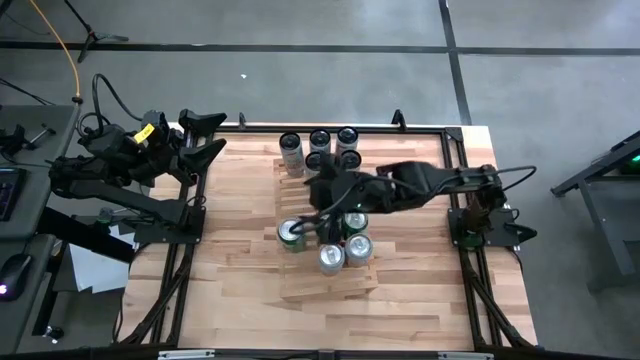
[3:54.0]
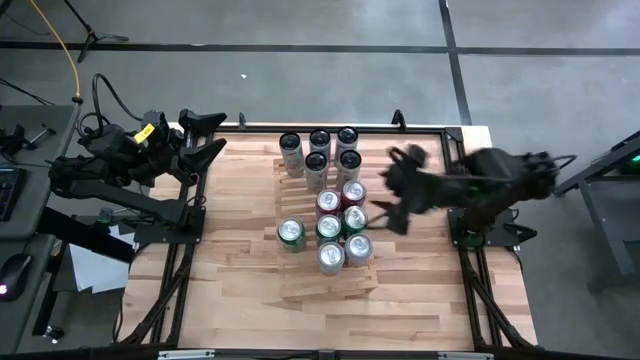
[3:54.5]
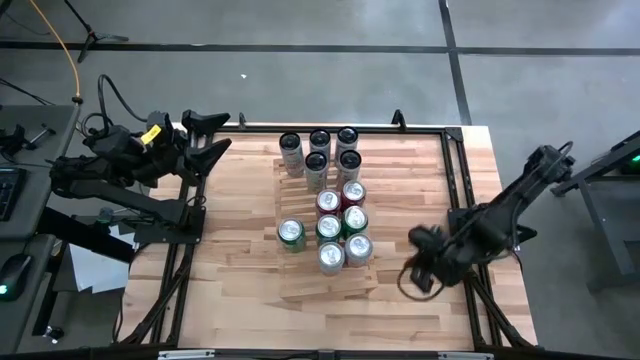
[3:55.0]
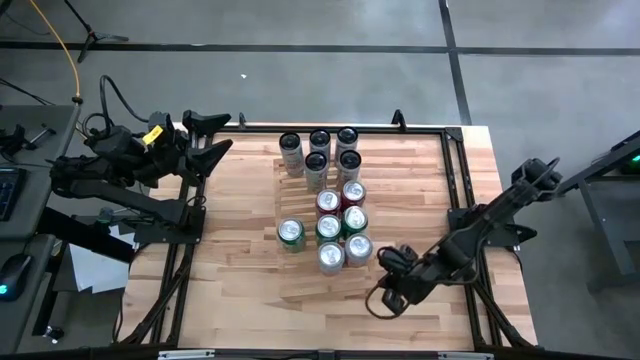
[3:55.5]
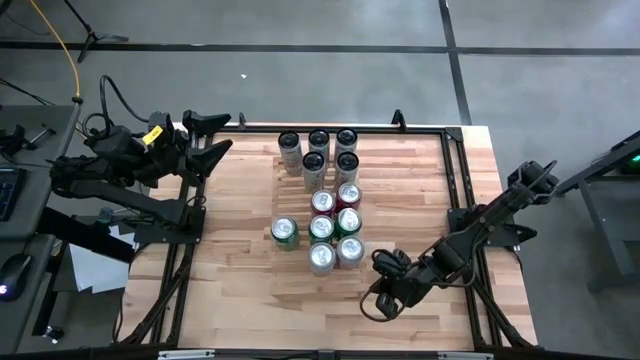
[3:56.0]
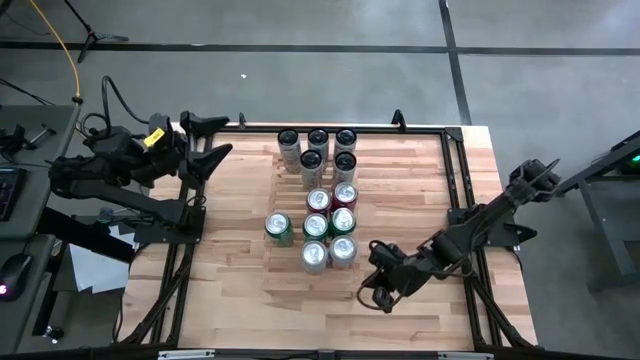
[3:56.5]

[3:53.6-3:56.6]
Task: Place canned beverage on shelf
Adjust the shelf

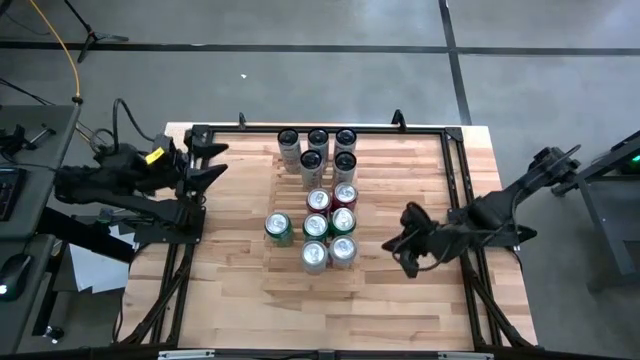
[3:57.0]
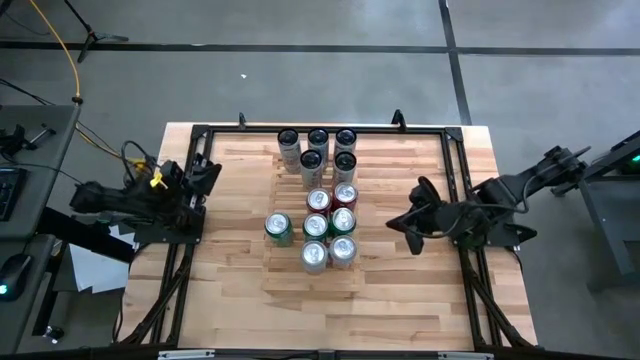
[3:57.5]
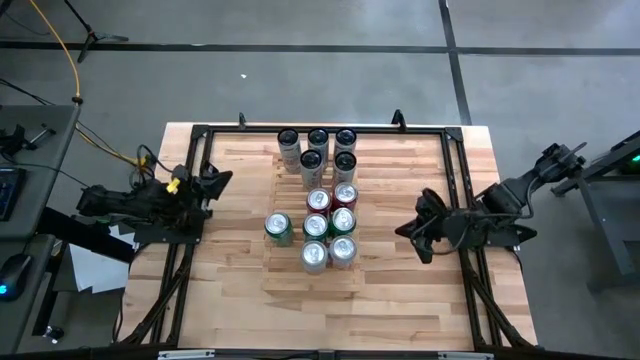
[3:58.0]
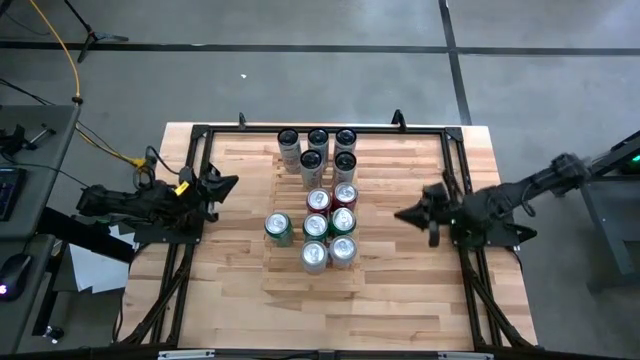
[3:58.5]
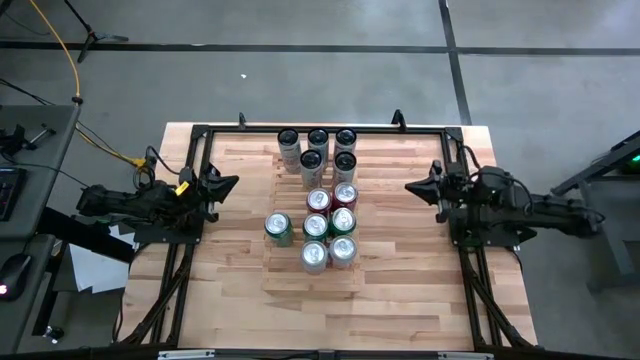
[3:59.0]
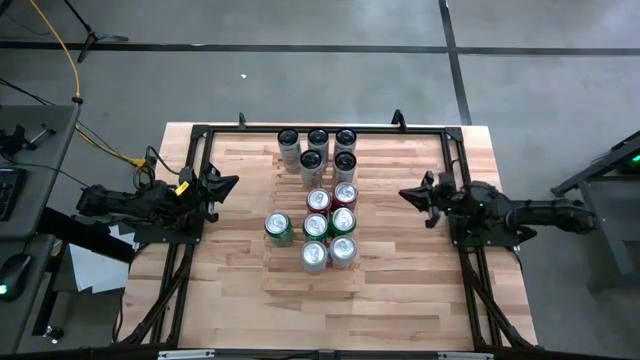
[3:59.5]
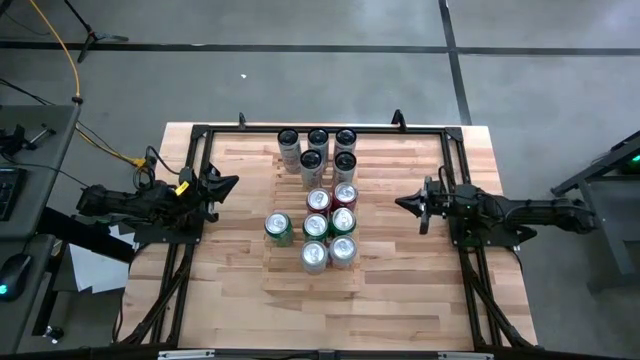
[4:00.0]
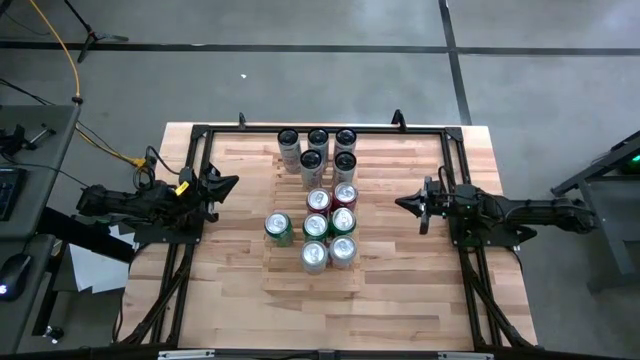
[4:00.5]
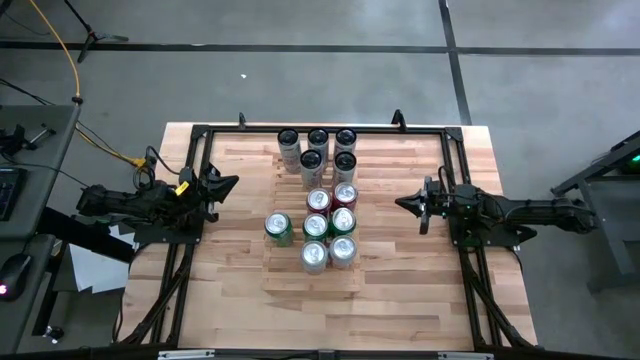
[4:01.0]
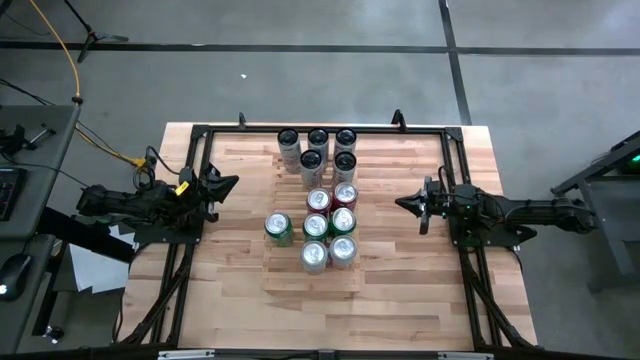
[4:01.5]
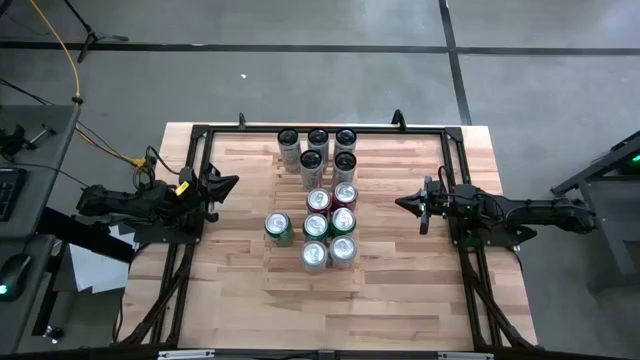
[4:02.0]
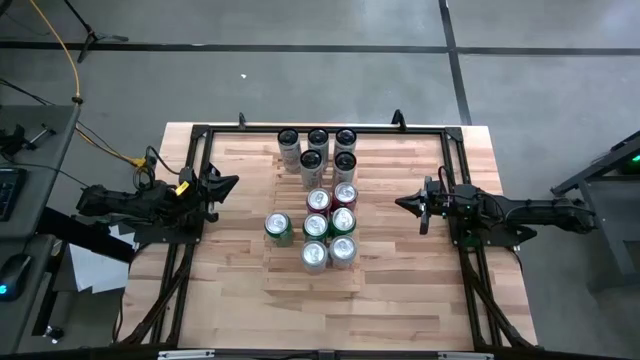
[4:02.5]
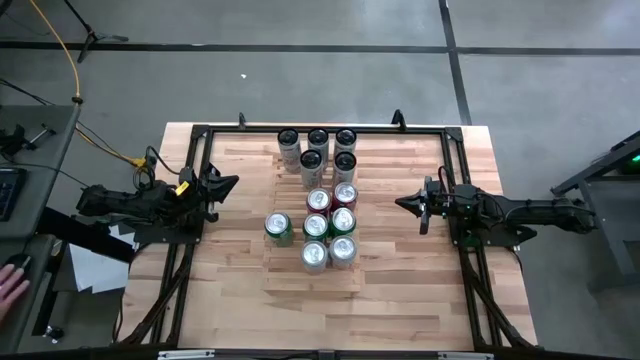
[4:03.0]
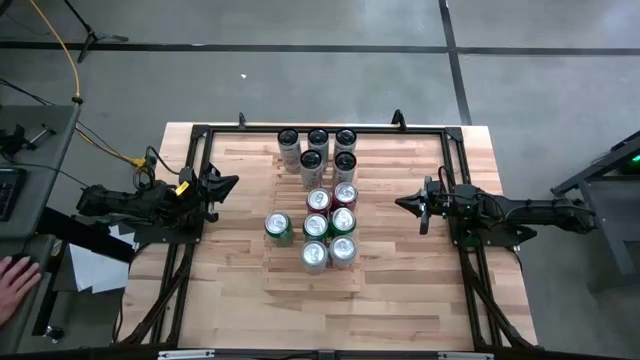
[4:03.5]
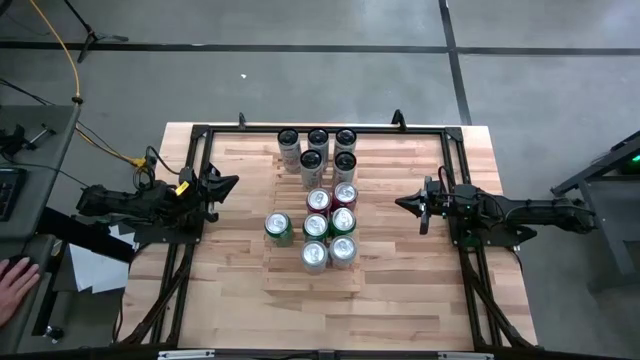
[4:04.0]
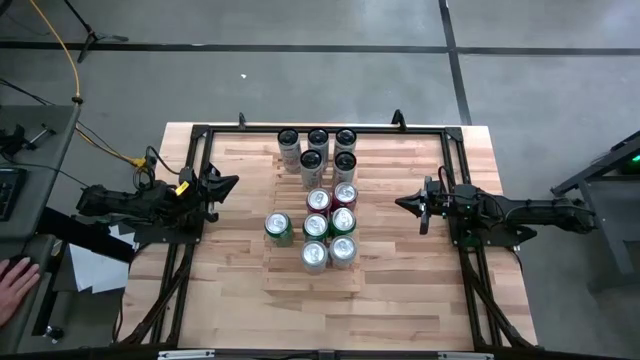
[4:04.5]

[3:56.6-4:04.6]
Return to Home Position

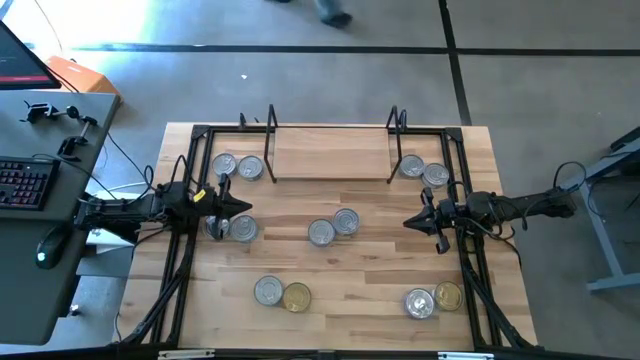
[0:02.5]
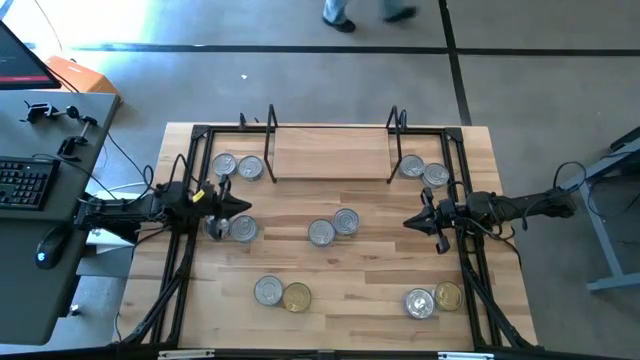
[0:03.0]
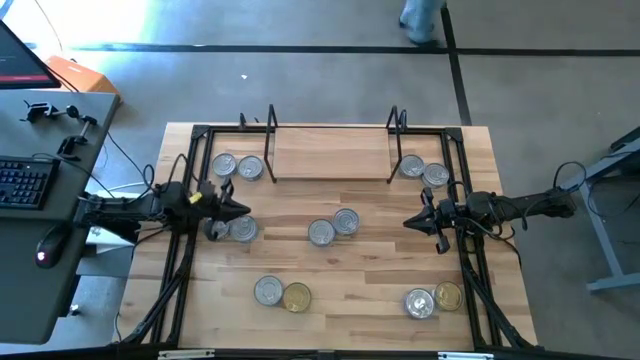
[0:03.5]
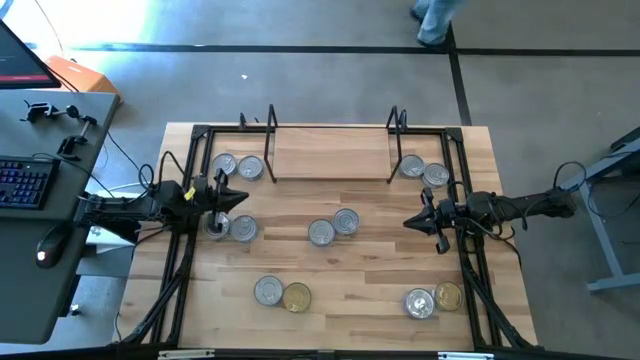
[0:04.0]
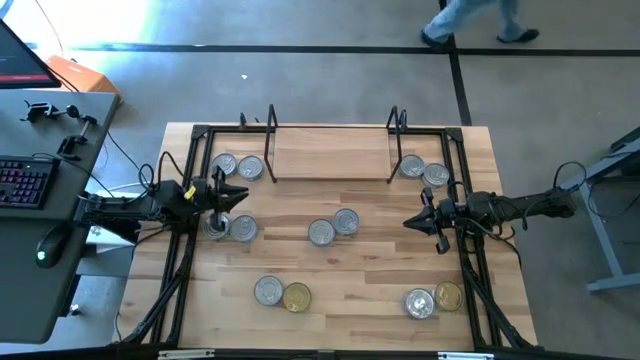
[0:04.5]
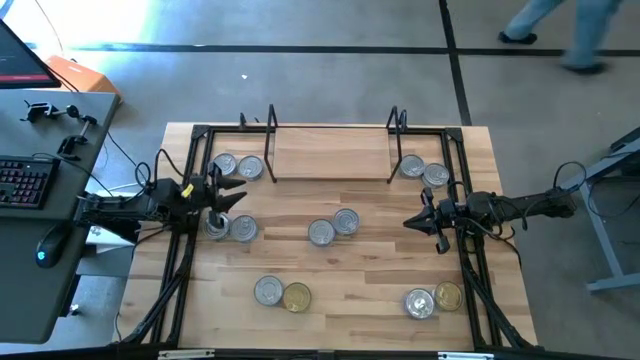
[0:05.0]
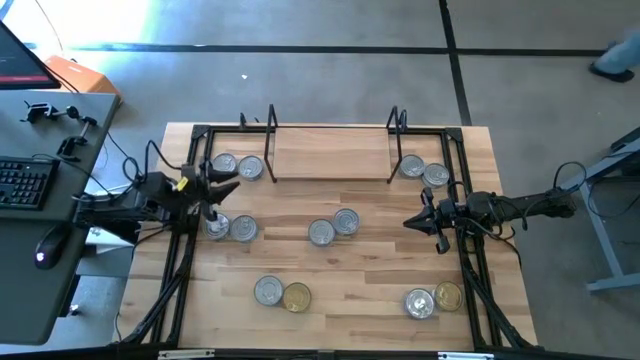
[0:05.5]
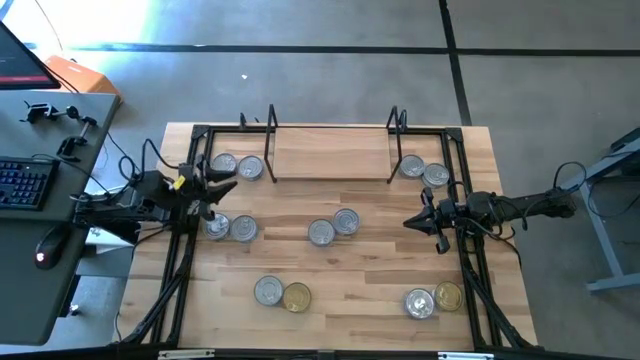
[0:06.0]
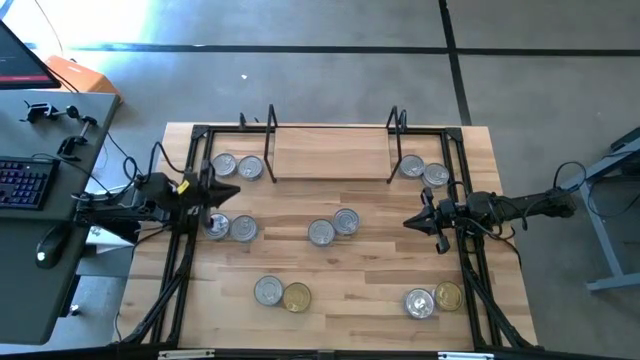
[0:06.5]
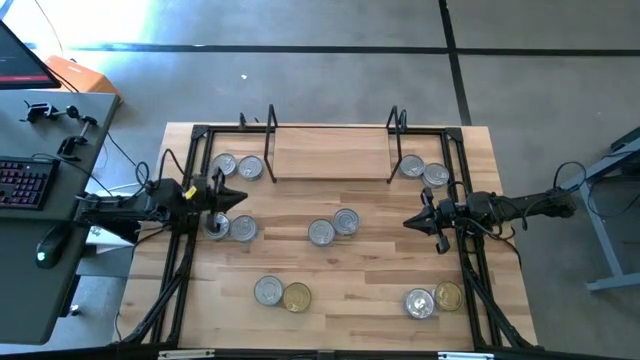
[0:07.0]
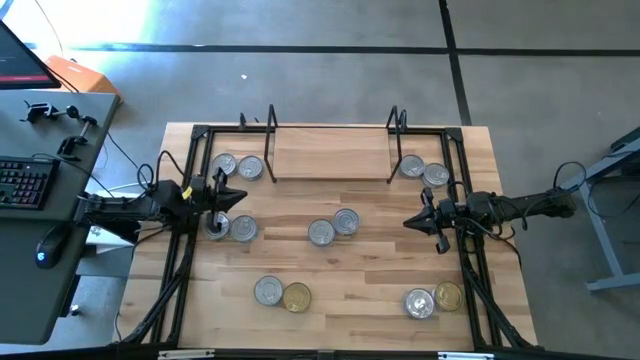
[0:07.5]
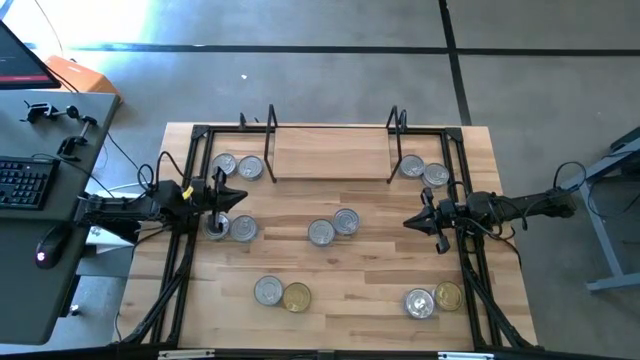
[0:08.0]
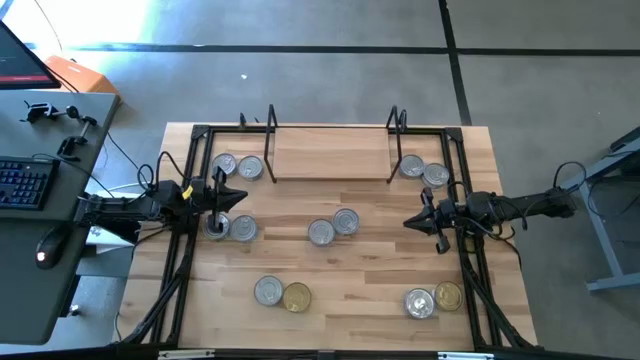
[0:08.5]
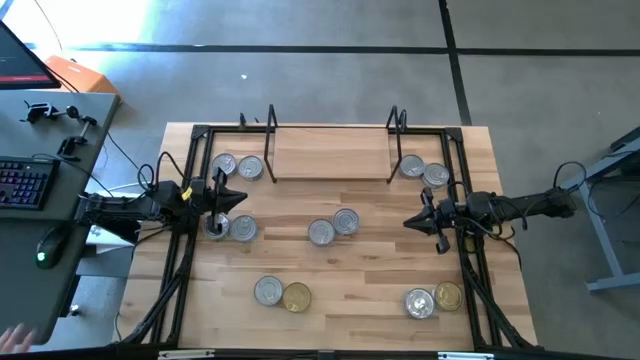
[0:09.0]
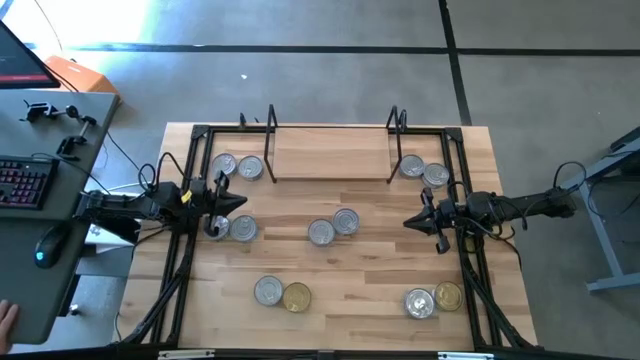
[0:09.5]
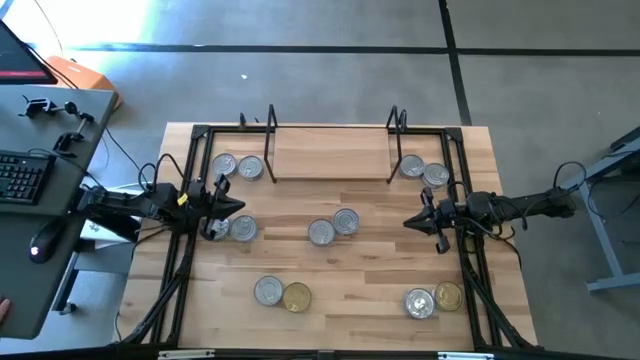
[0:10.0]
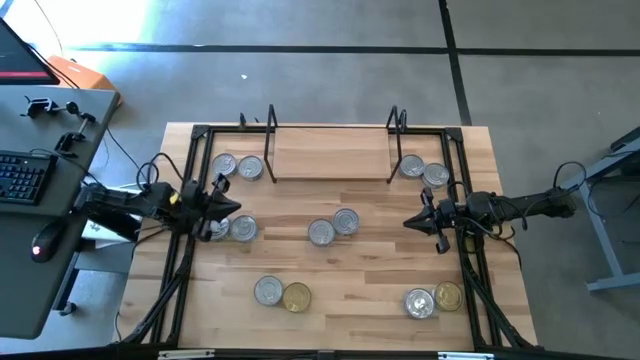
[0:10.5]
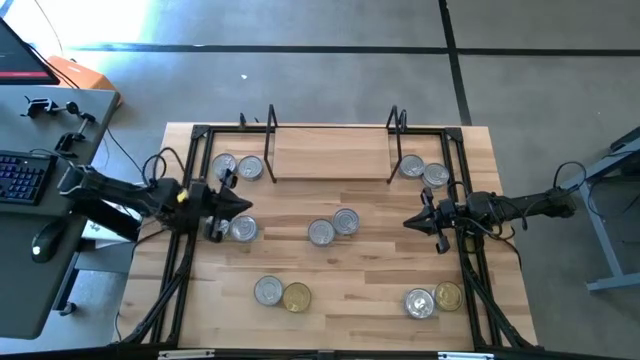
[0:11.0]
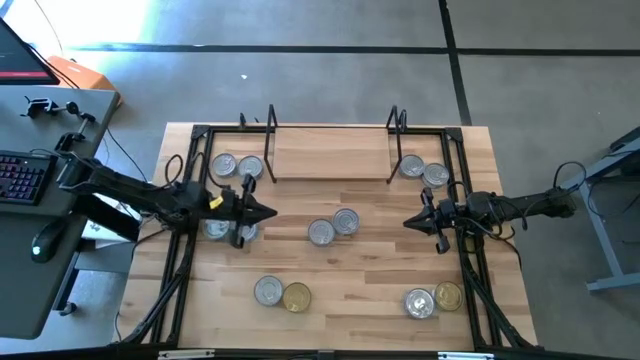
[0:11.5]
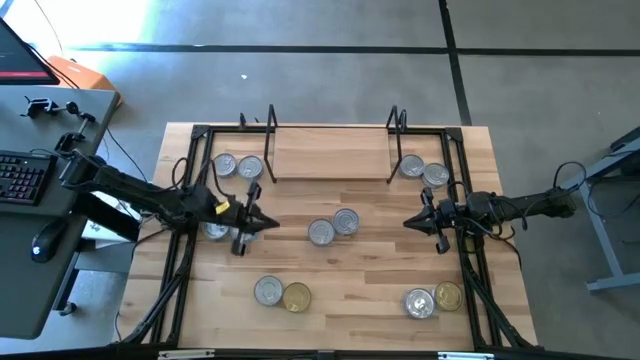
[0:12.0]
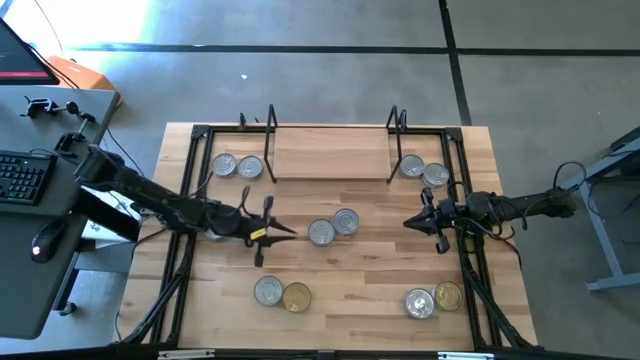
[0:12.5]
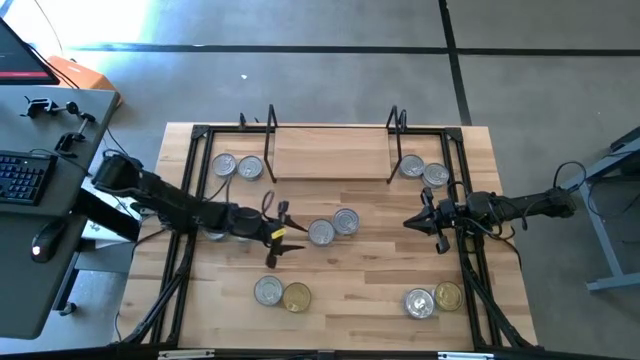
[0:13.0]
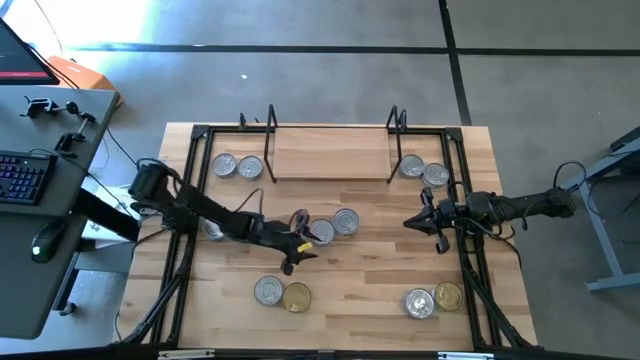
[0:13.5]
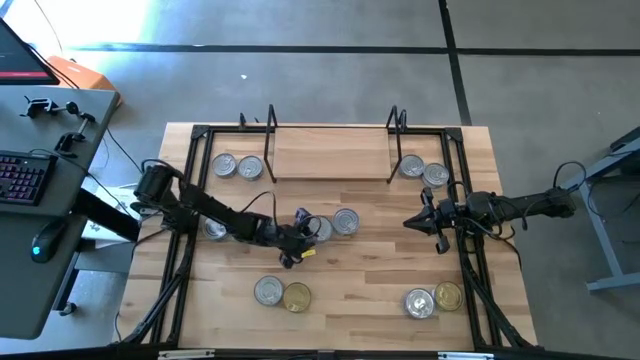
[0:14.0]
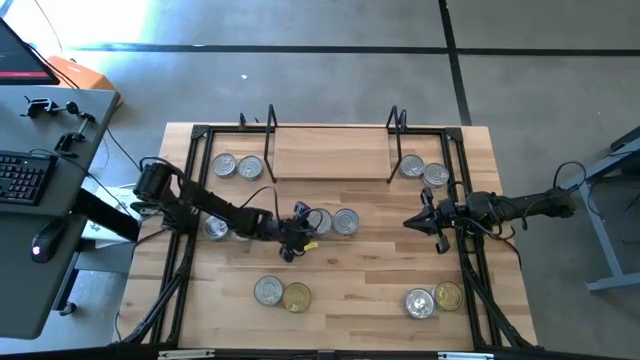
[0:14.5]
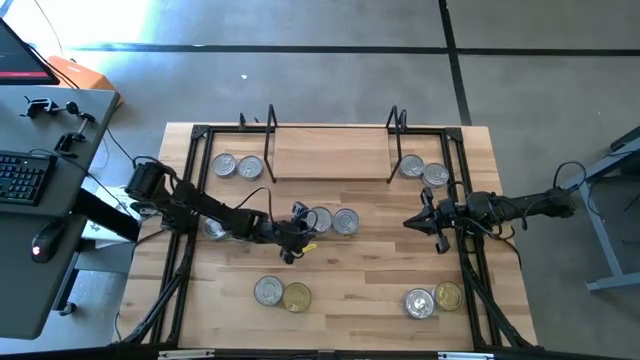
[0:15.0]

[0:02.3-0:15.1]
Task: Stack canned seafood by type on shelf
Put the blue tuna can on the shelf
